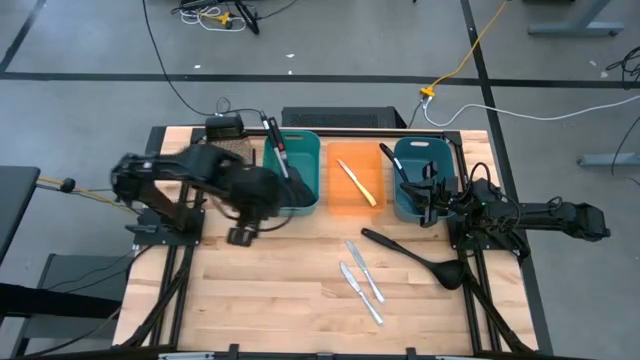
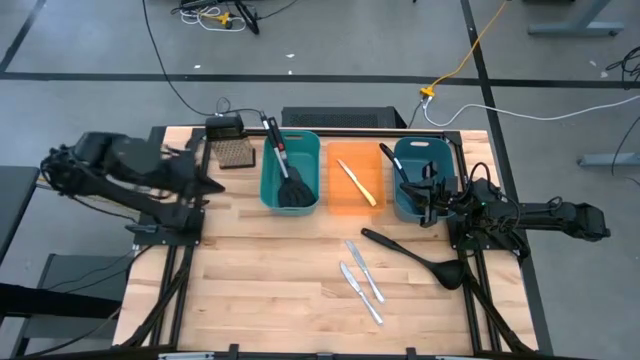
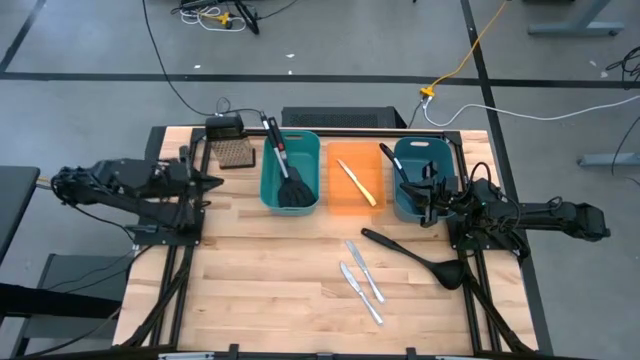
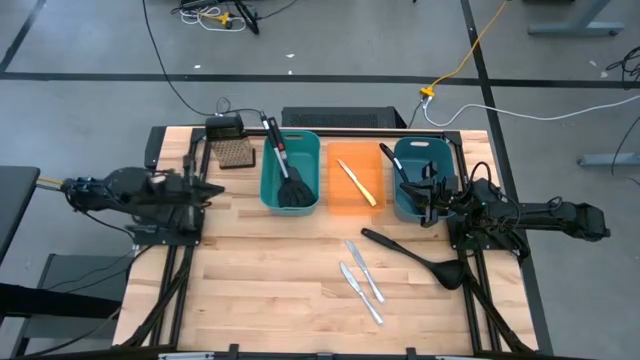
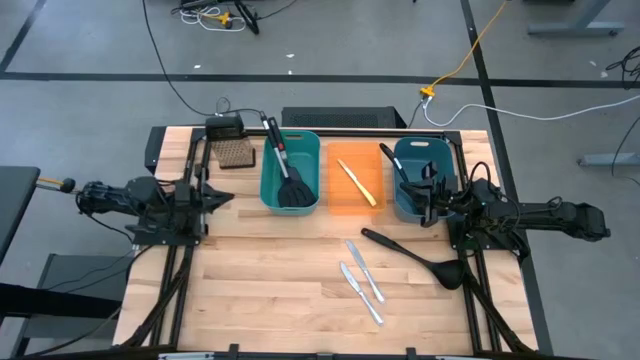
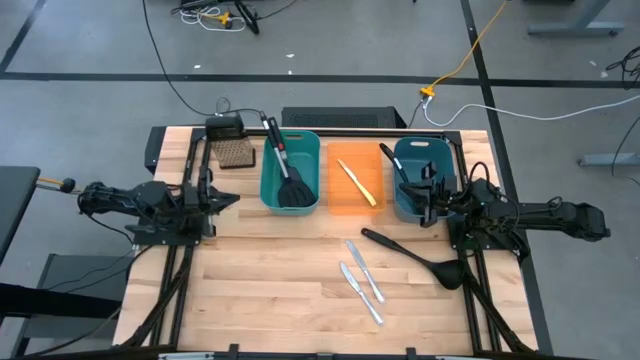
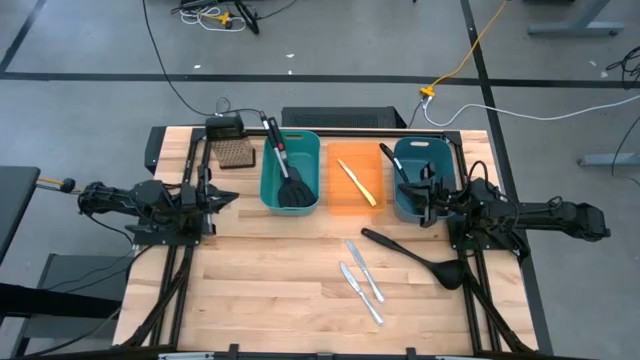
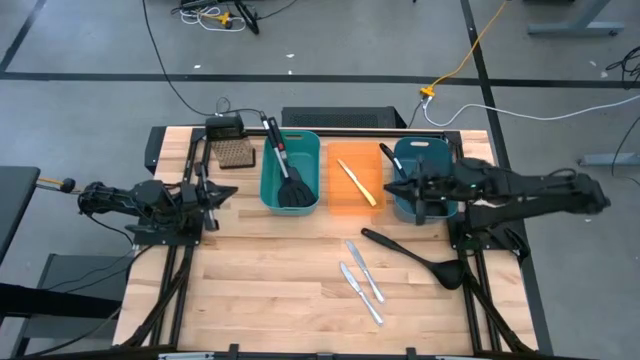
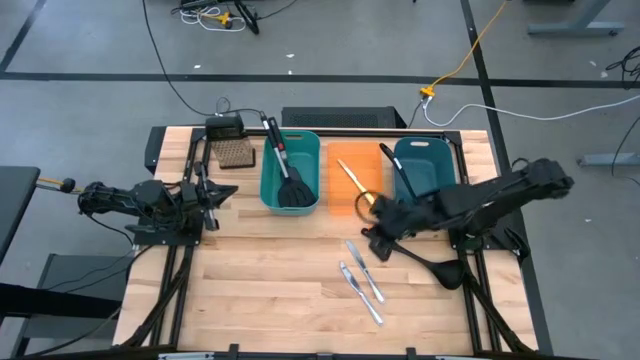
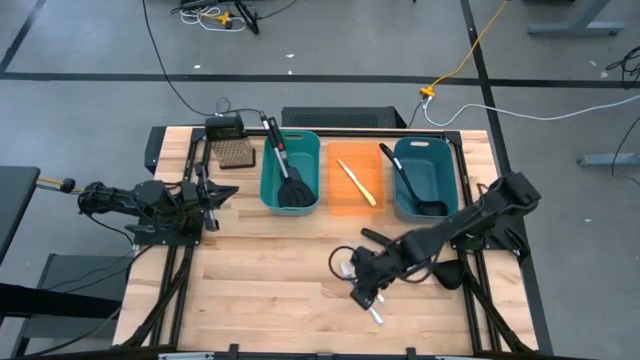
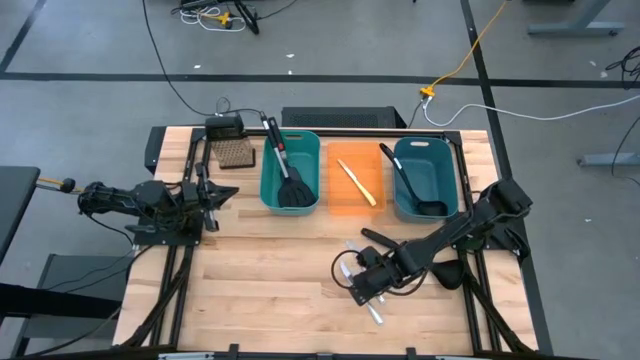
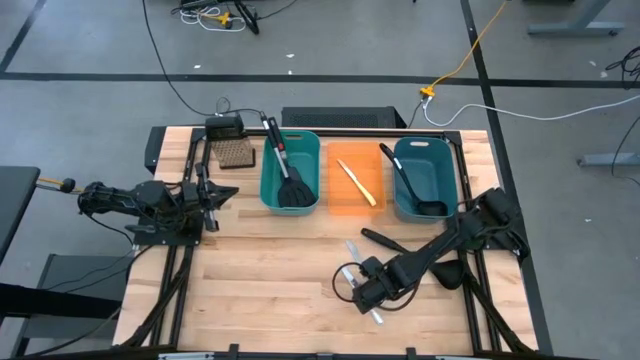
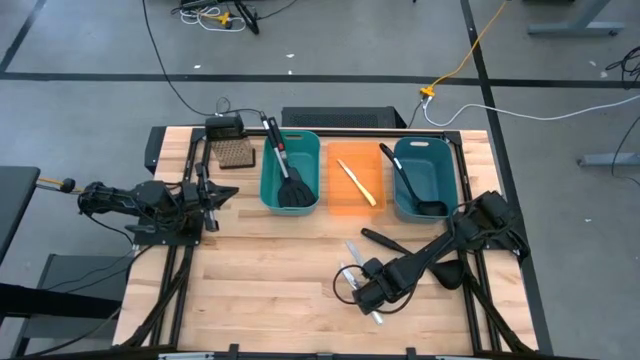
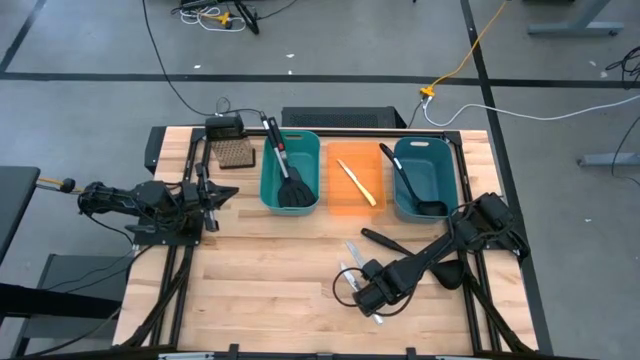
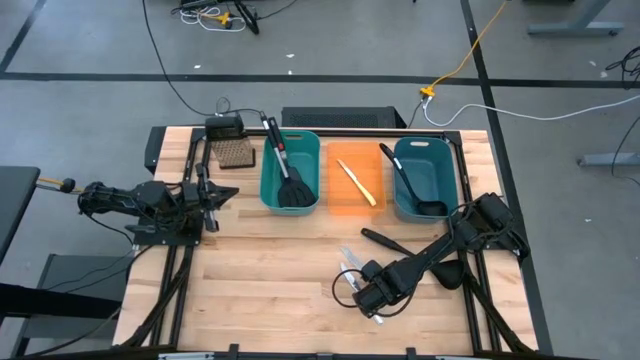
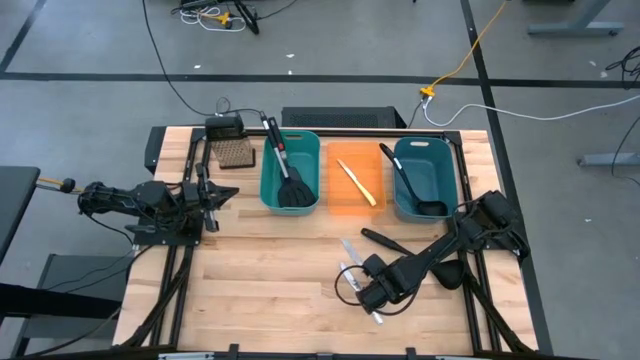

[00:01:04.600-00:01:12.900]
Task: Pick & Place Kitchen Items
Put the right silver knife into the orange container

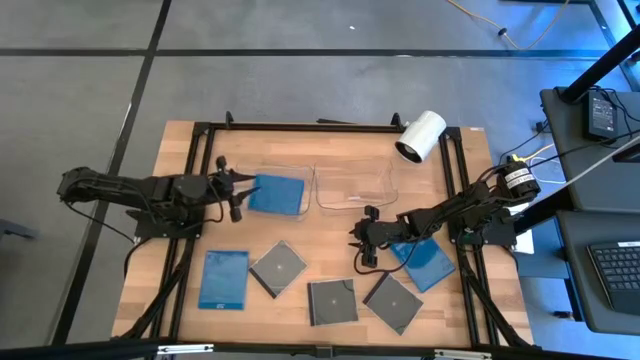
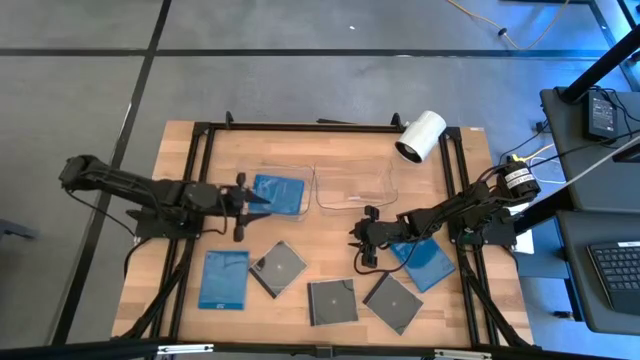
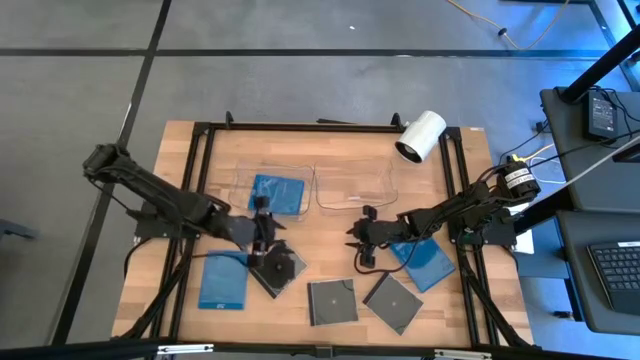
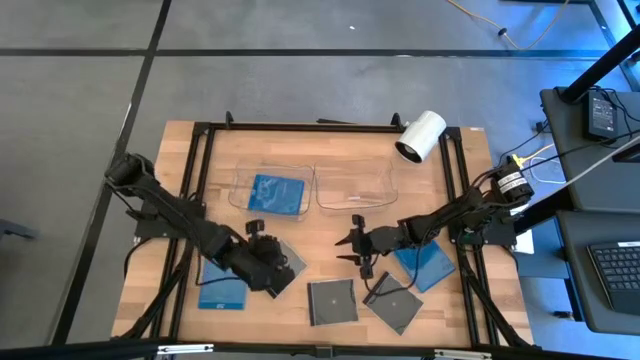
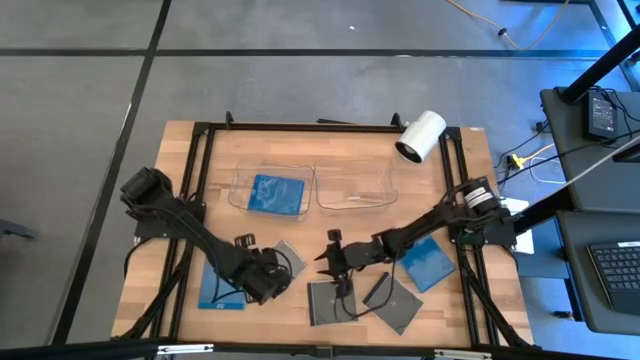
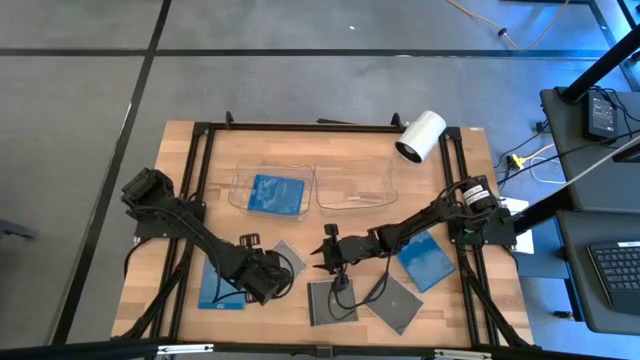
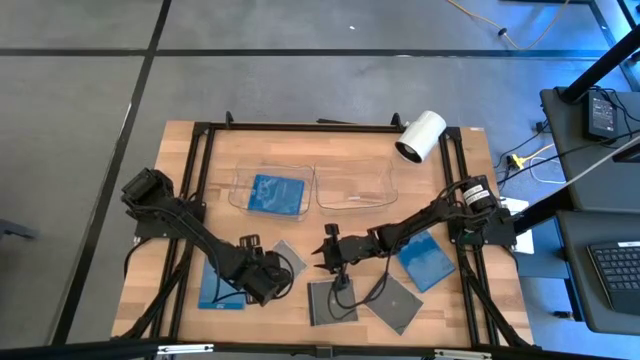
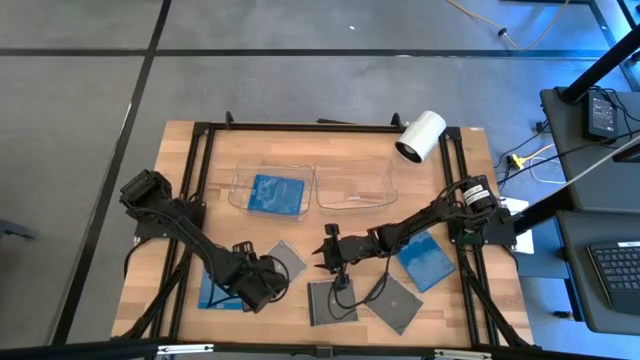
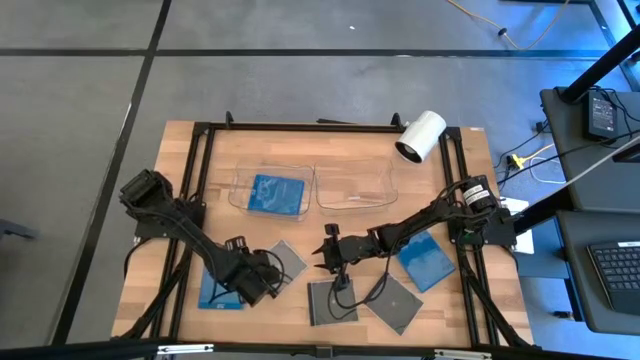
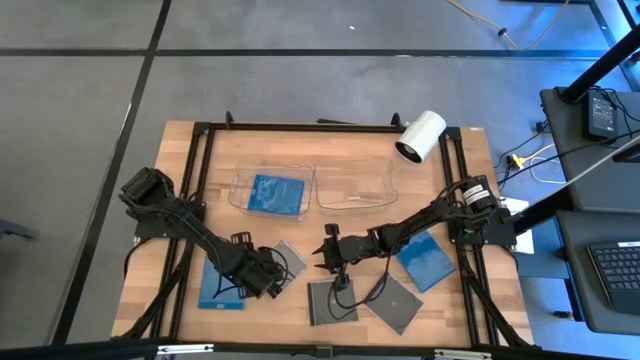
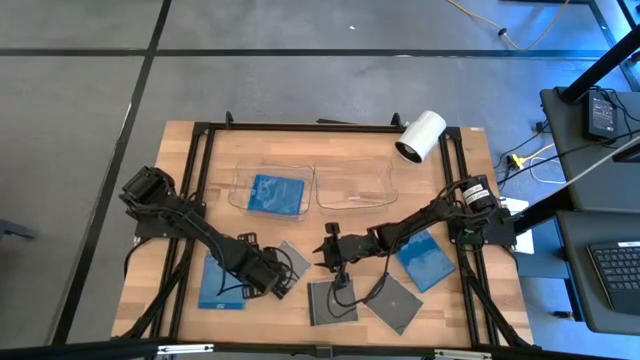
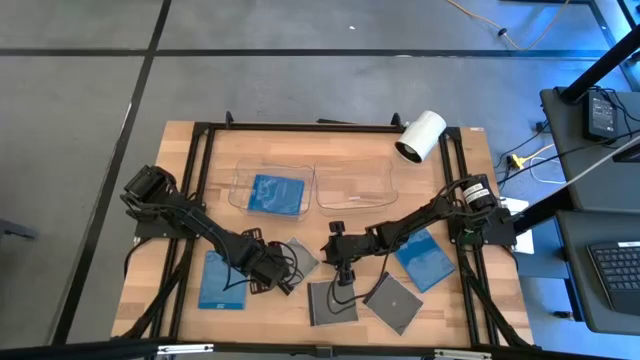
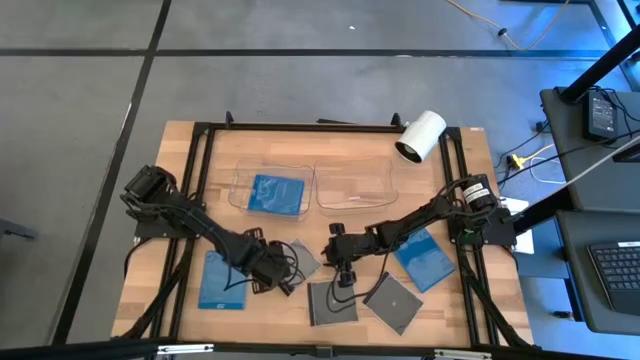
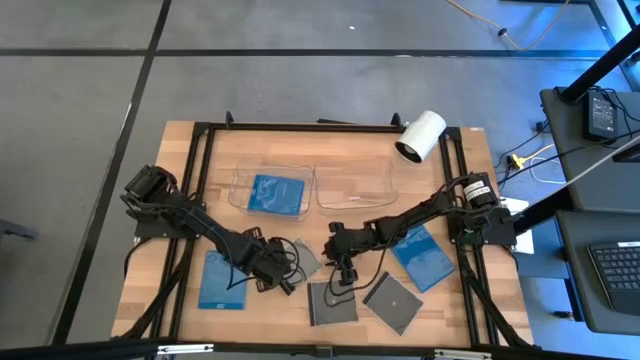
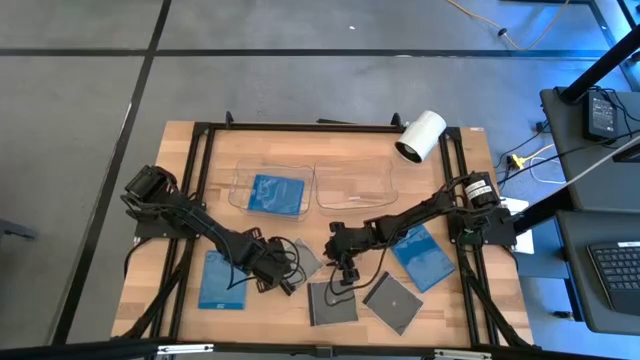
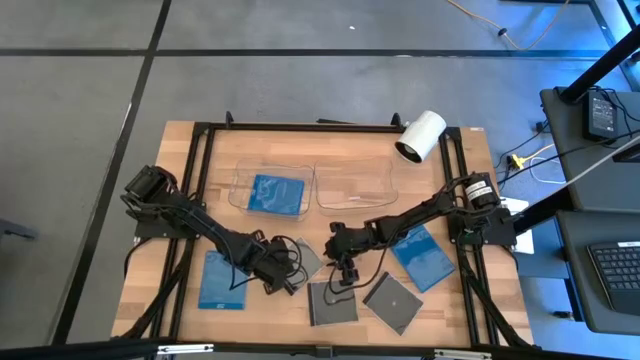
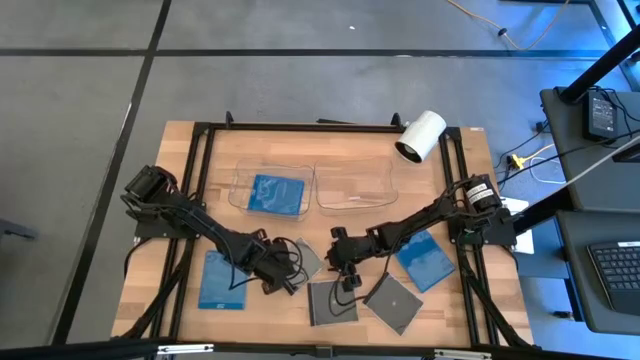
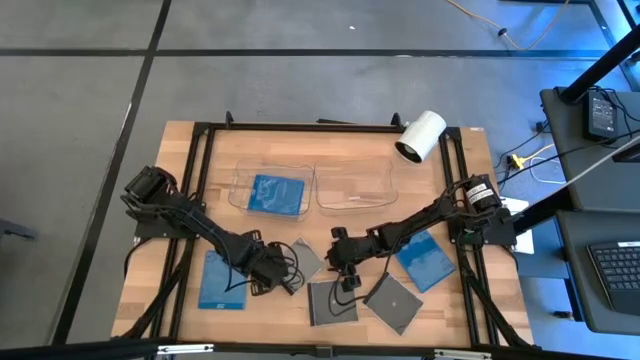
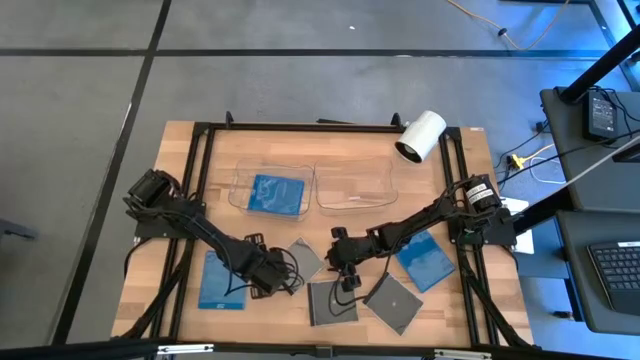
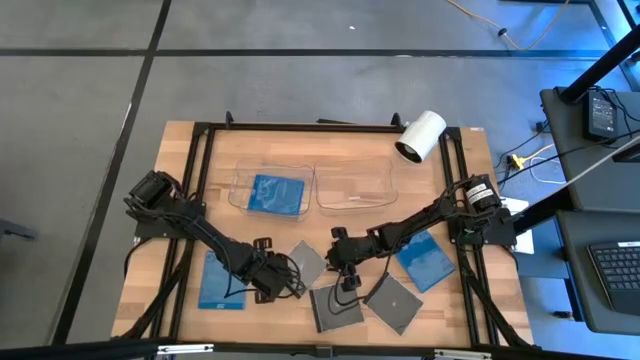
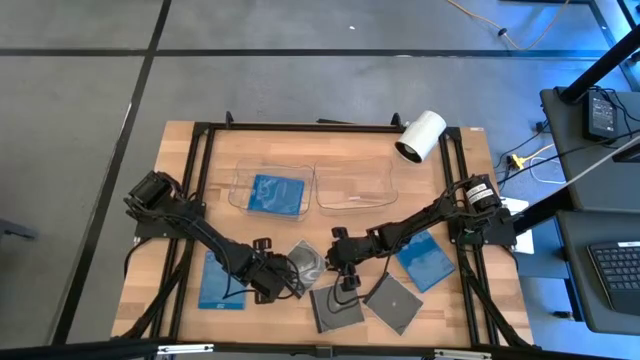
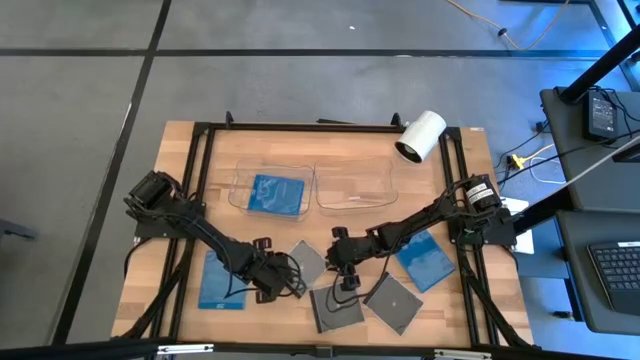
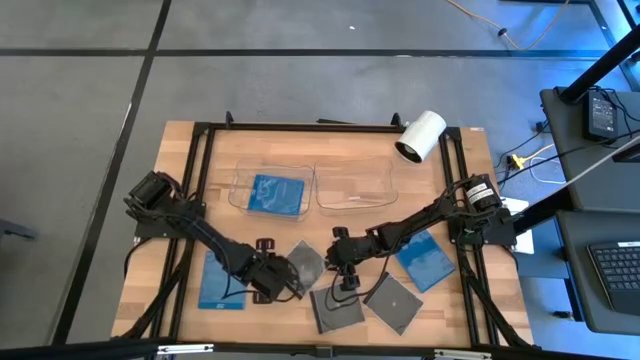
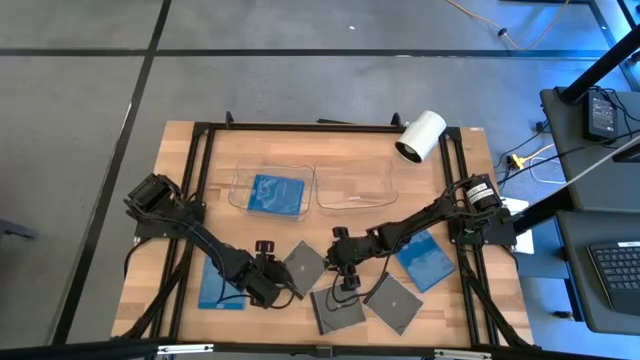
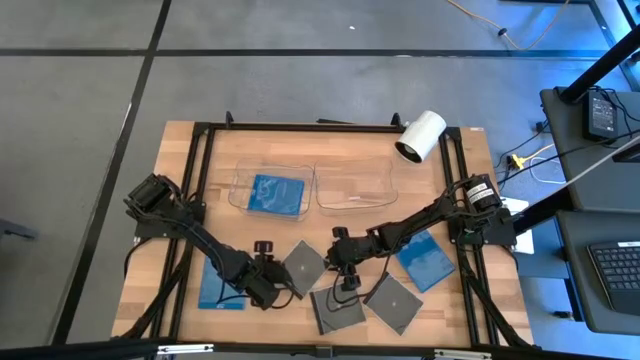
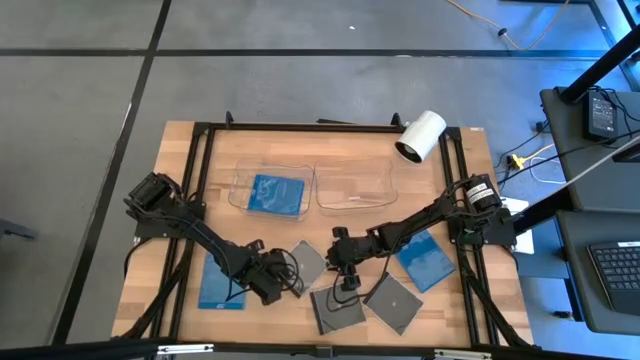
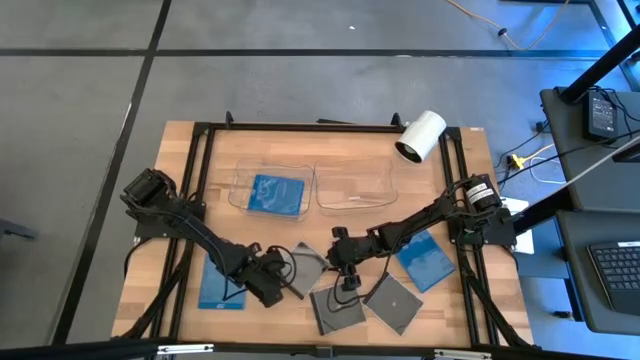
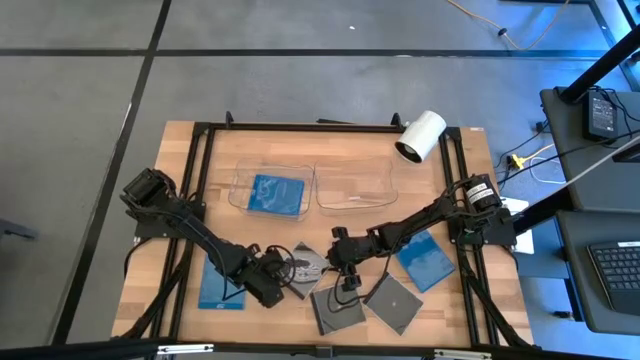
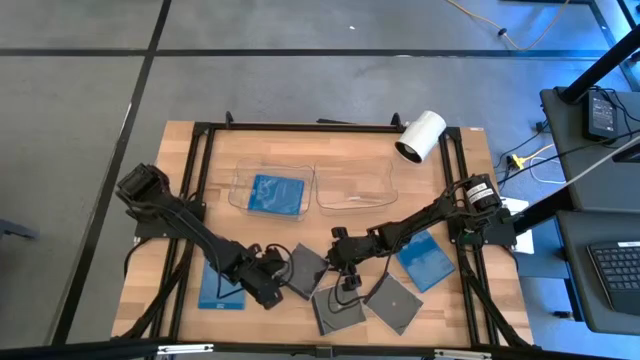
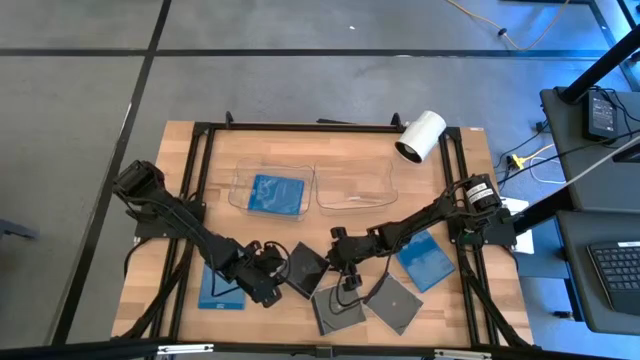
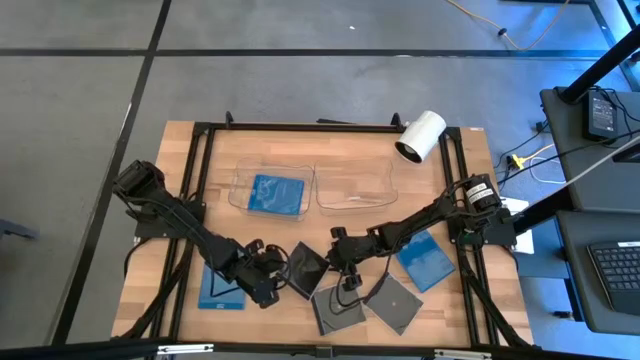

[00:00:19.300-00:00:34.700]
Task: Pick & place jewel cases by type
Put the left black CD case into the right transparent bin
